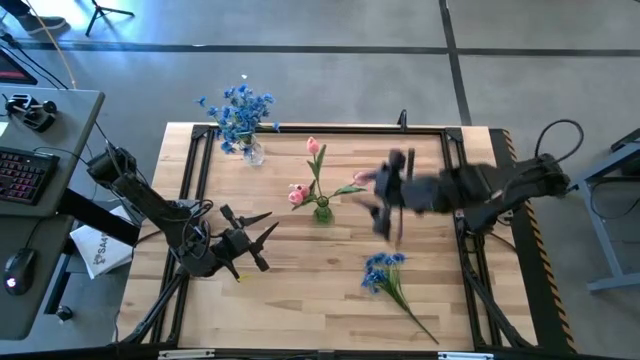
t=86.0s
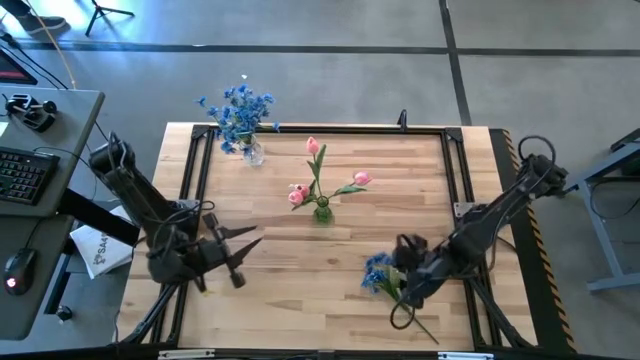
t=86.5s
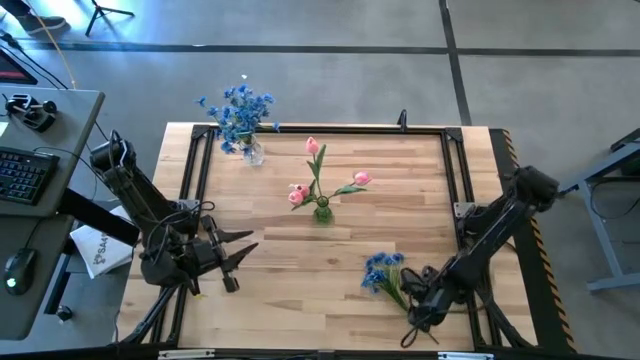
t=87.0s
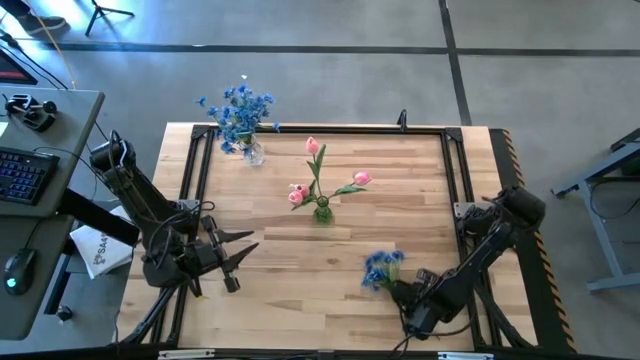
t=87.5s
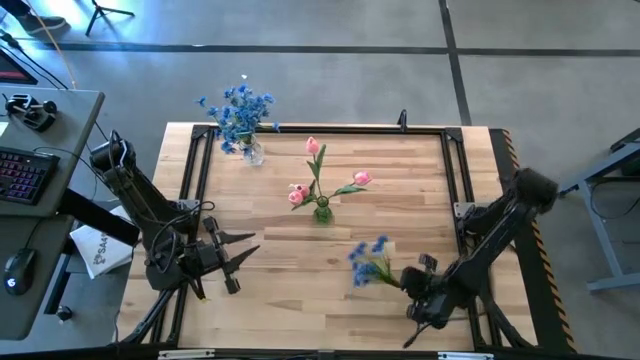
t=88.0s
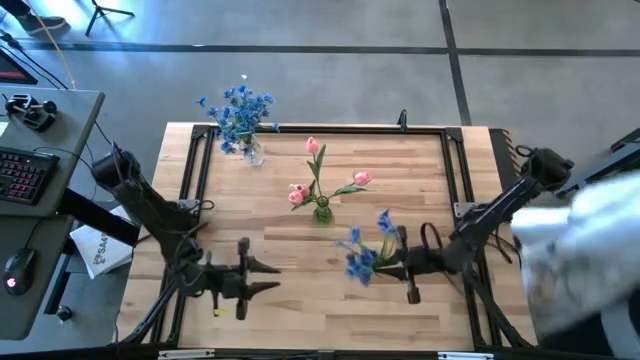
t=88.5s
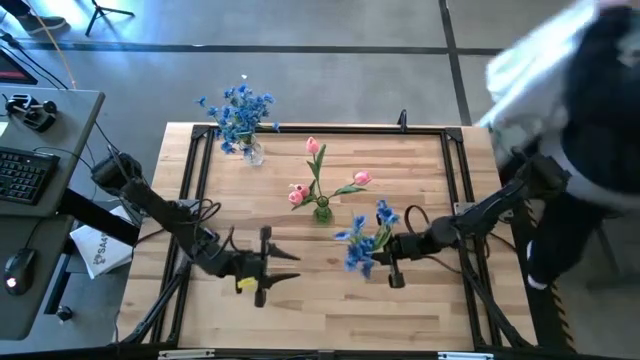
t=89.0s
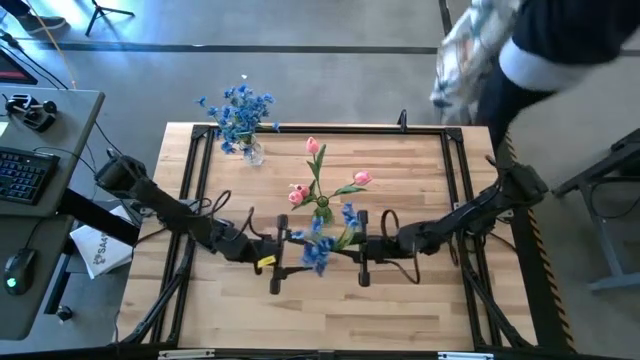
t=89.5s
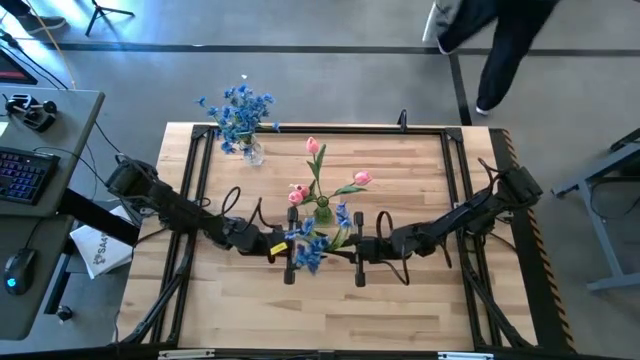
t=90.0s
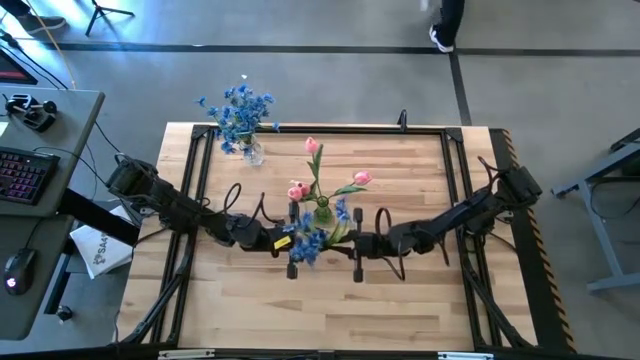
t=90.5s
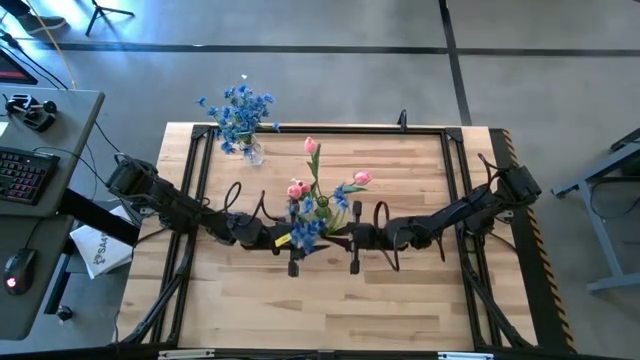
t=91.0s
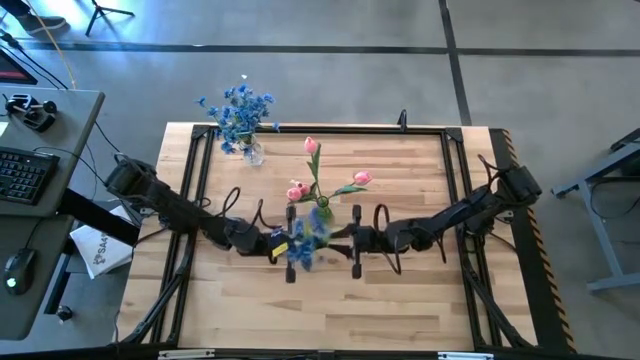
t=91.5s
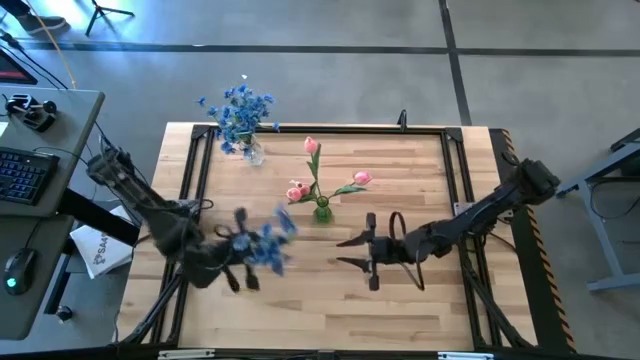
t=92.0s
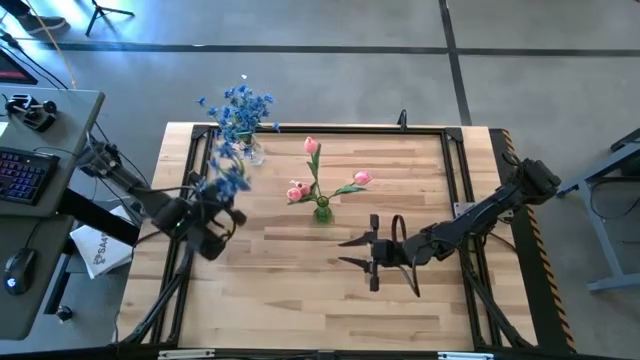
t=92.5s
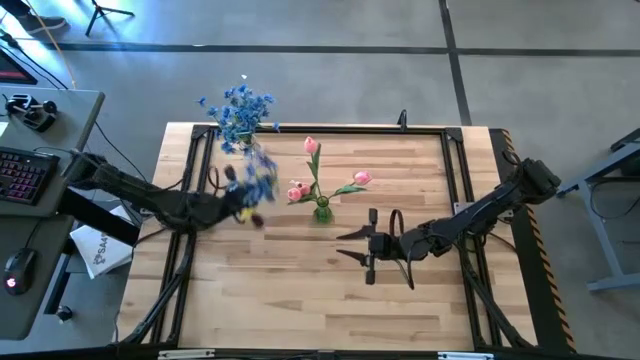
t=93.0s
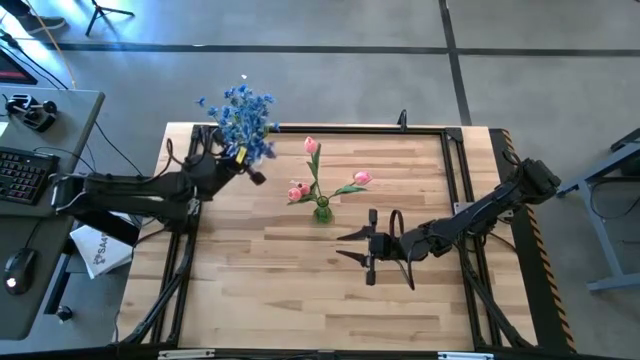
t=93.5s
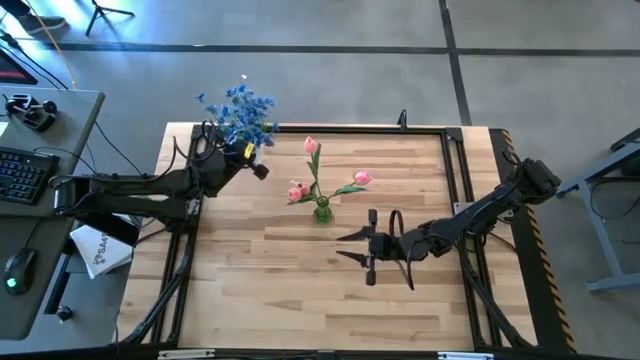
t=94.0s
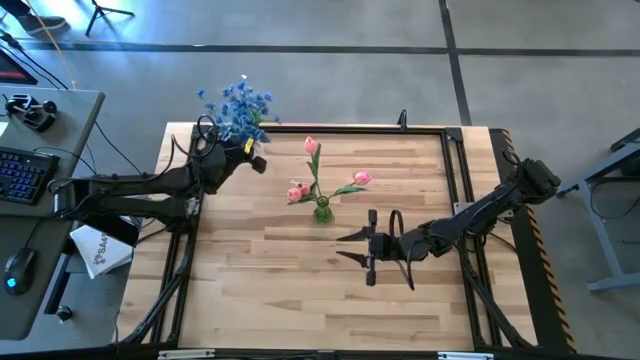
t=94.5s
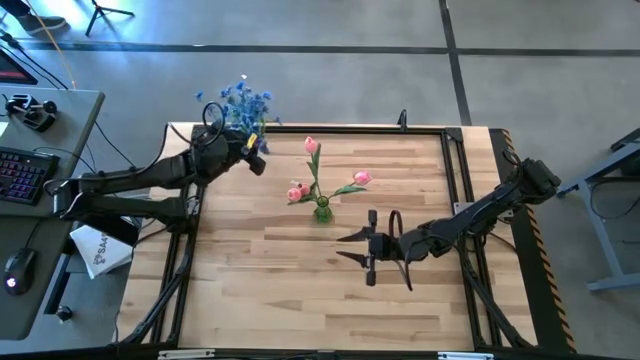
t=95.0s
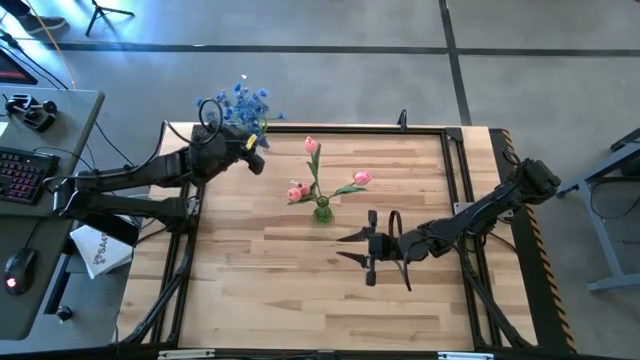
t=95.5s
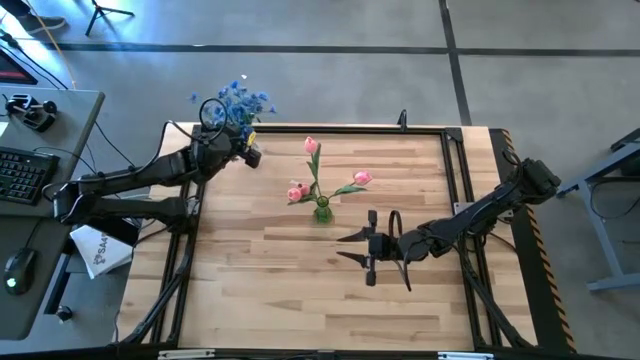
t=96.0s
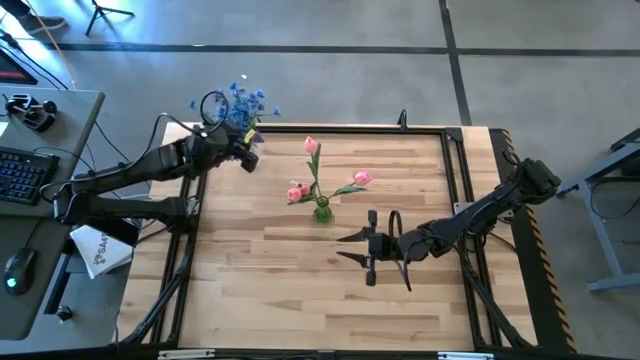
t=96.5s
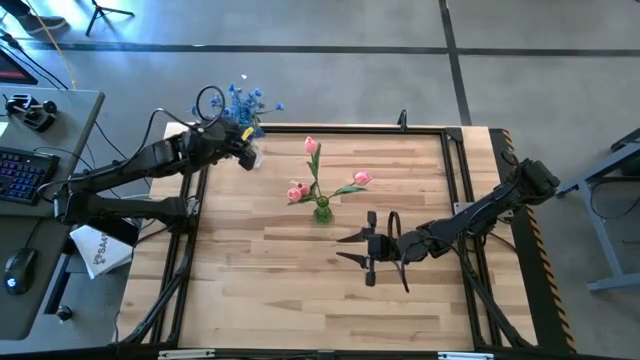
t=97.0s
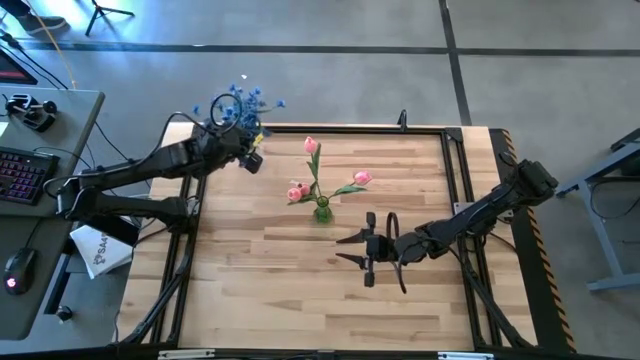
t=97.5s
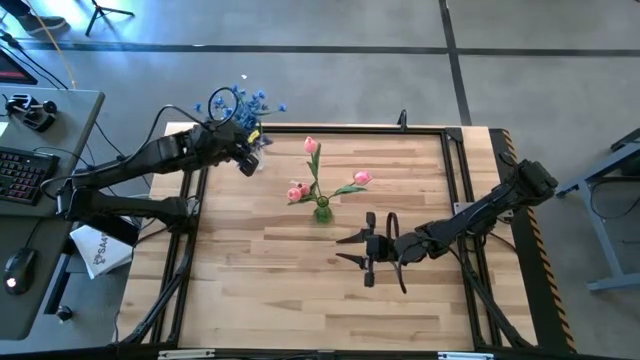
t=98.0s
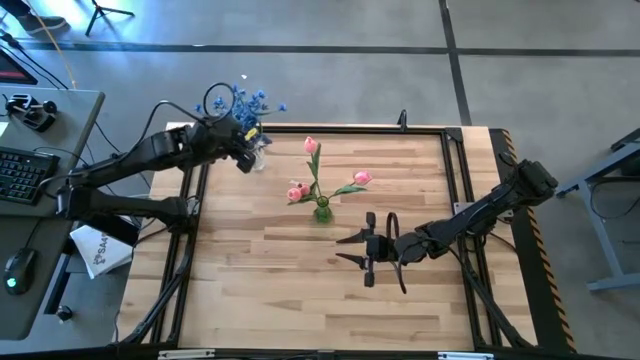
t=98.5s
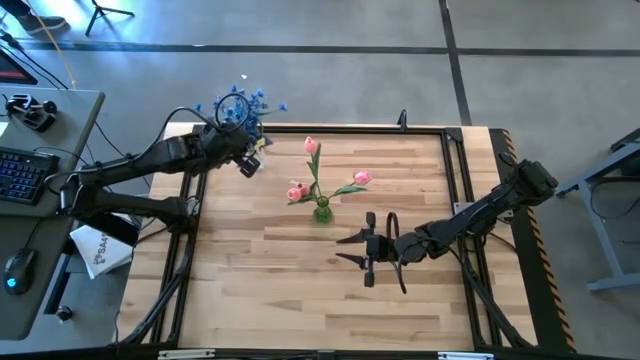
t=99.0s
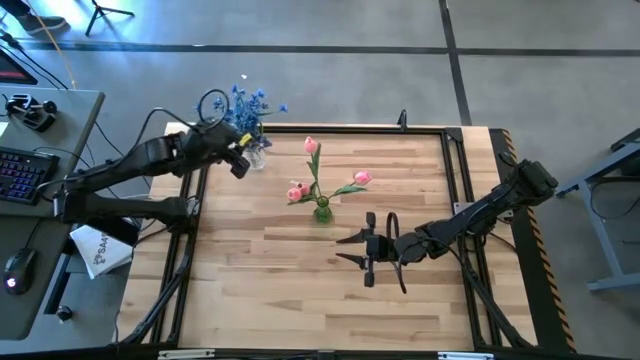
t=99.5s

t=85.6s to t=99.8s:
Task: Sort flowers into vase by color
Put the blue flowers into the transparent vase

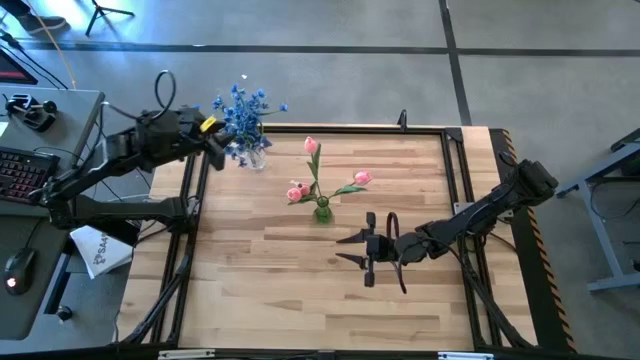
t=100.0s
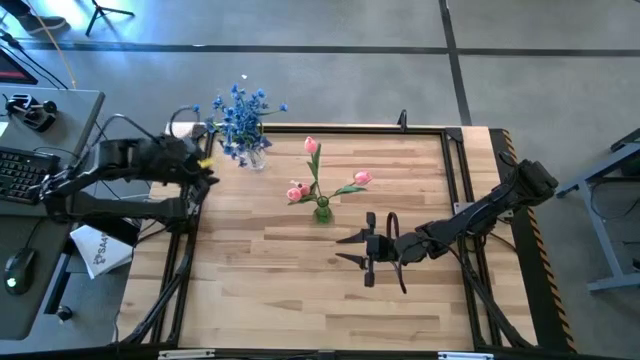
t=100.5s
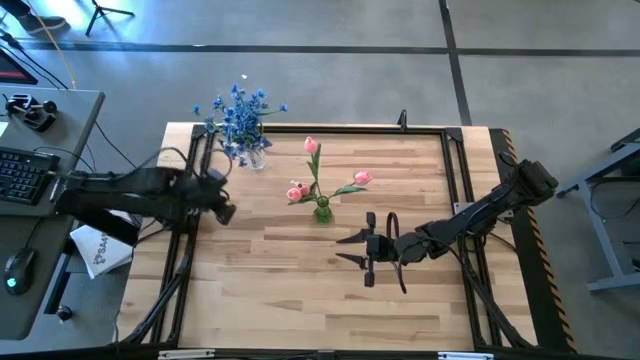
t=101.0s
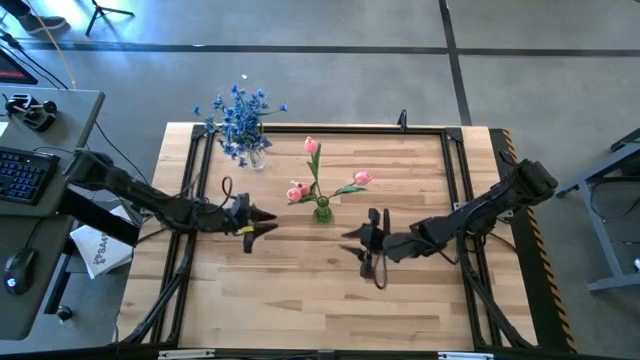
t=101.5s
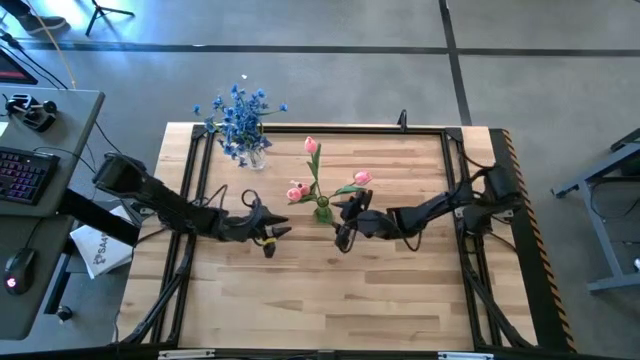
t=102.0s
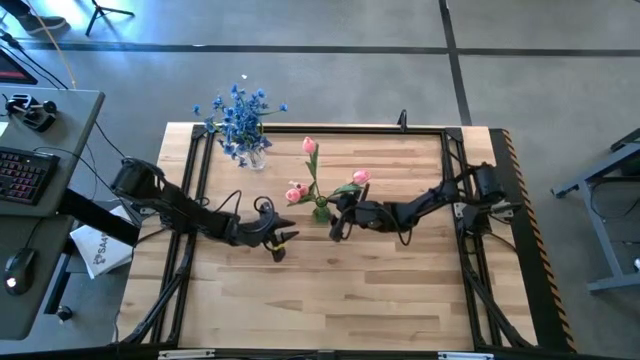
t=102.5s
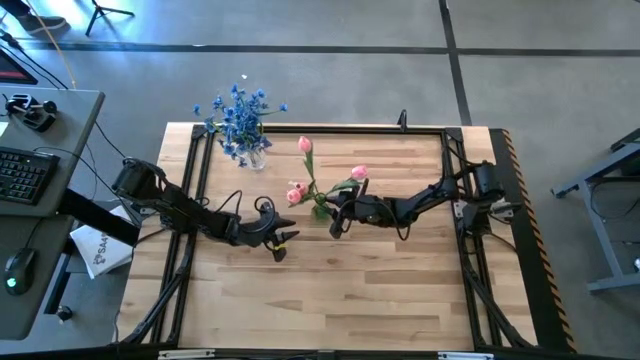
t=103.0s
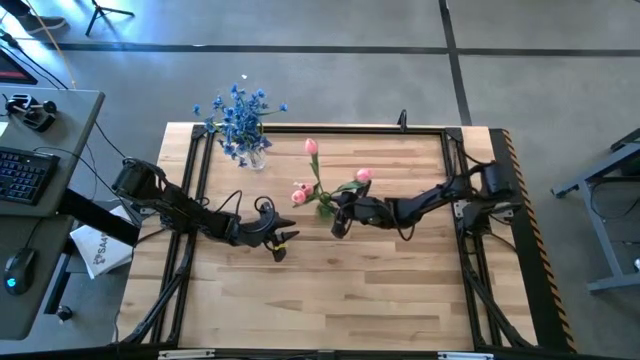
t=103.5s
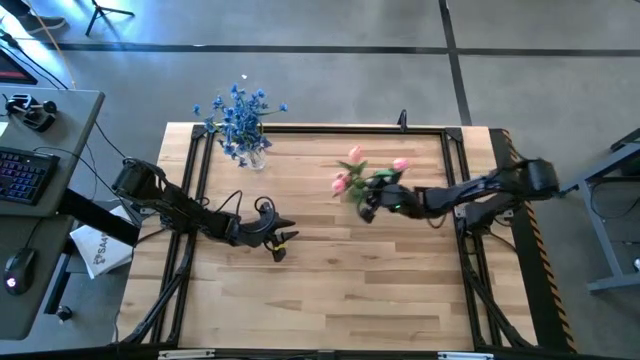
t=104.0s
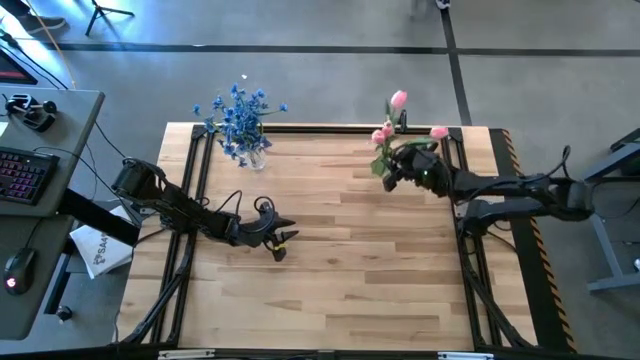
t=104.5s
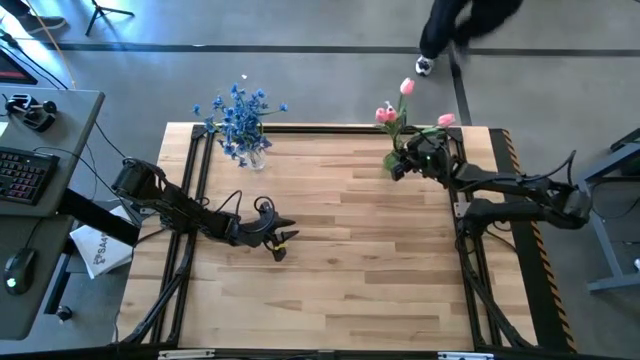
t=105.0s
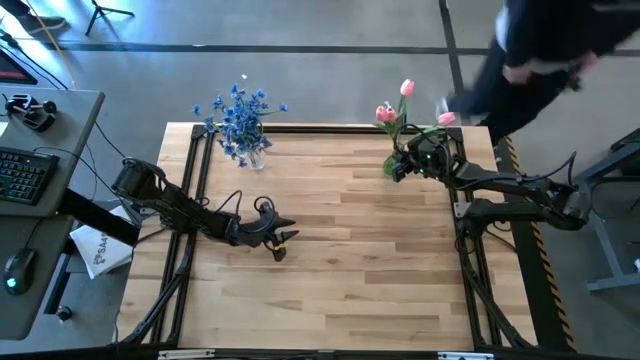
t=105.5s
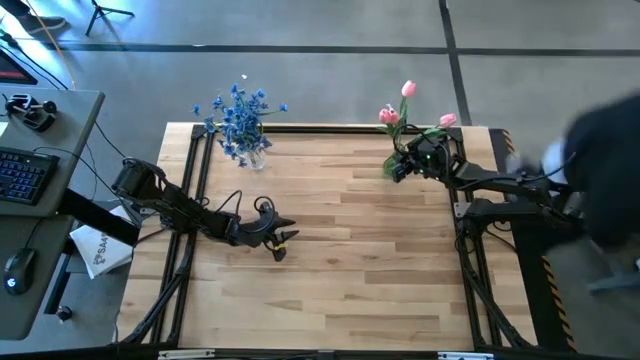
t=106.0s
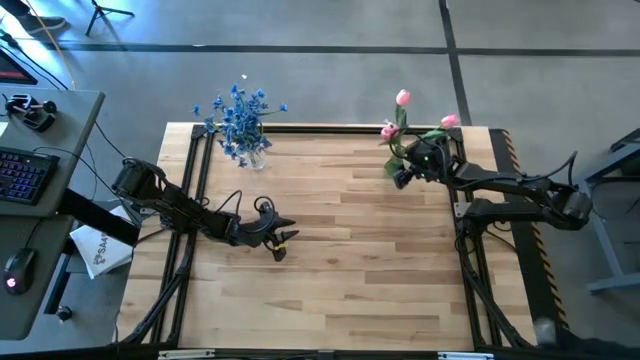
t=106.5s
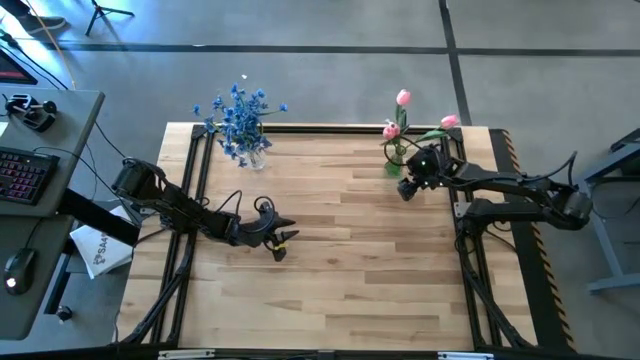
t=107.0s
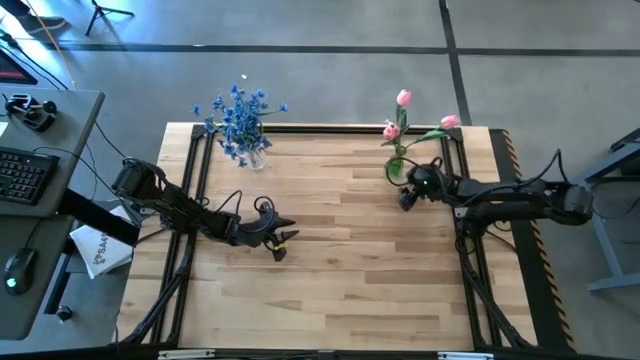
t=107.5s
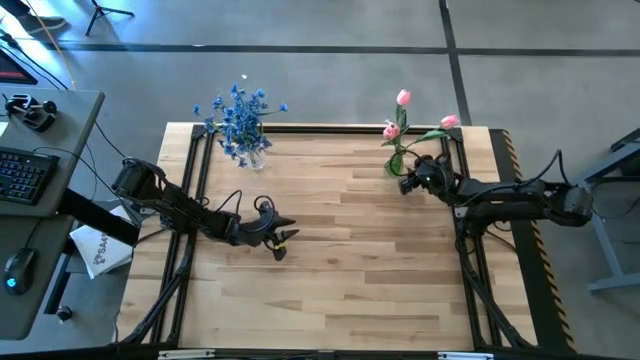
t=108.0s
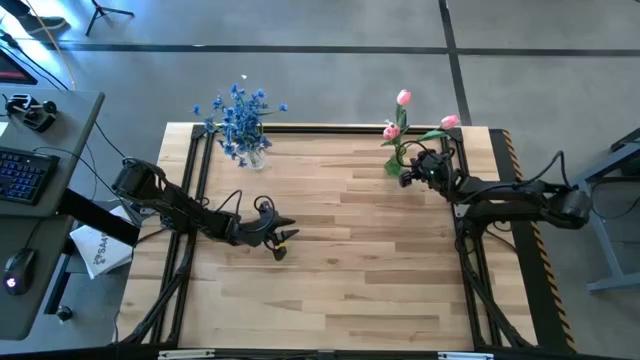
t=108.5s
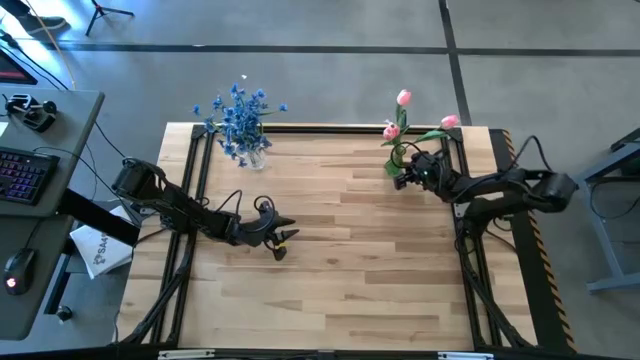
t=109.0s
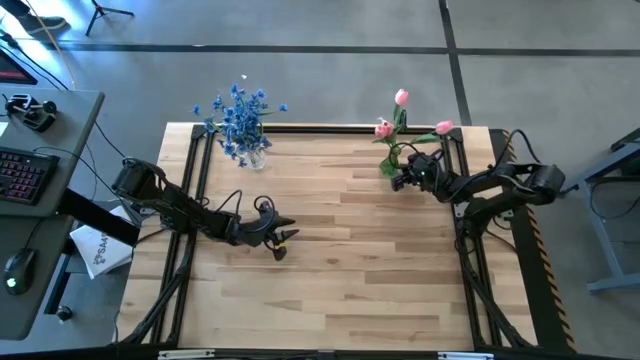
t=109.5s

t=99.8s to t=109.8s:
Move the green vase to the top right of the table
